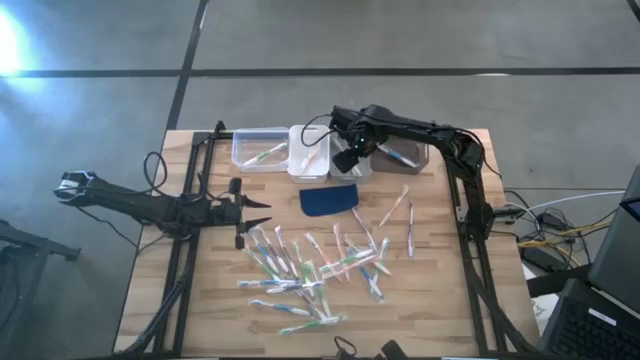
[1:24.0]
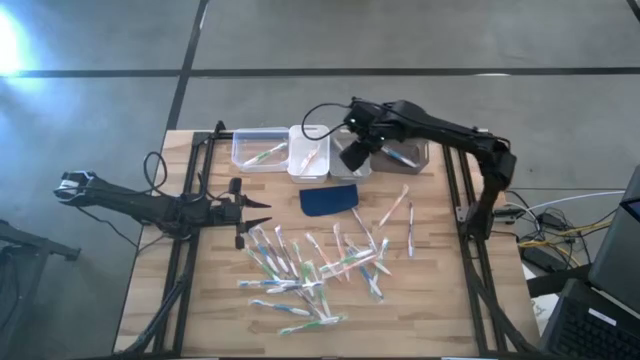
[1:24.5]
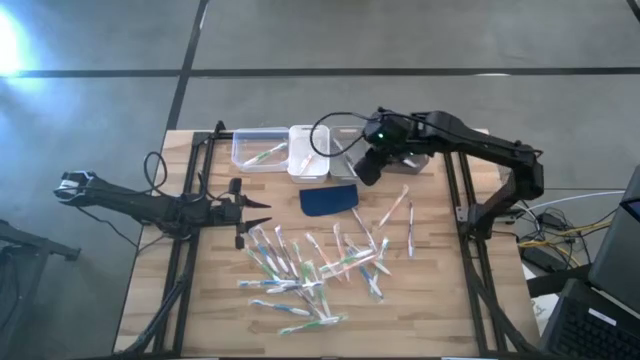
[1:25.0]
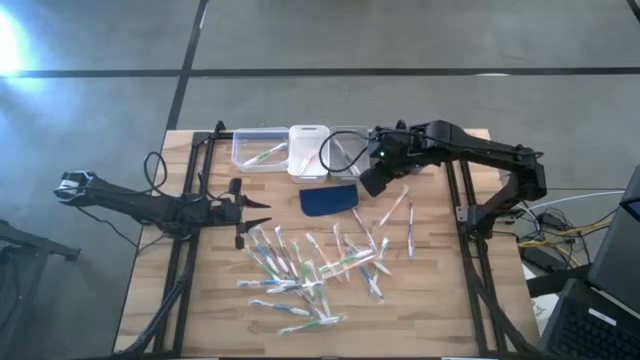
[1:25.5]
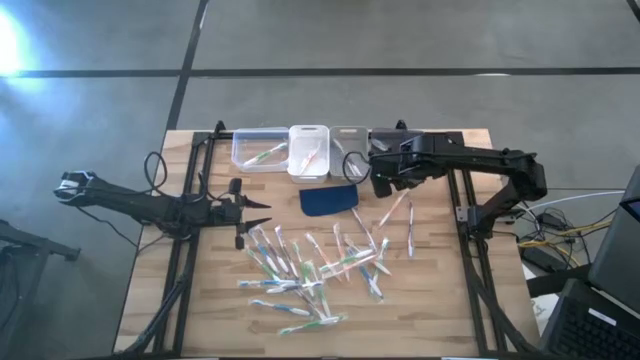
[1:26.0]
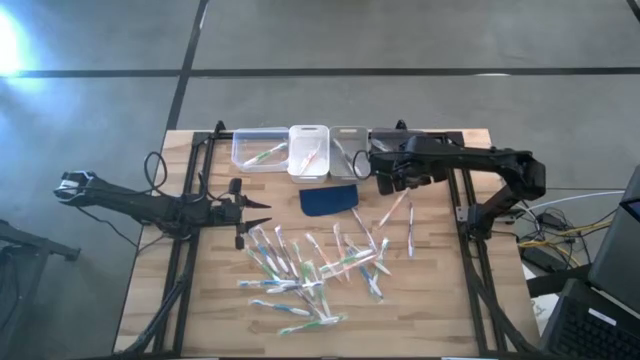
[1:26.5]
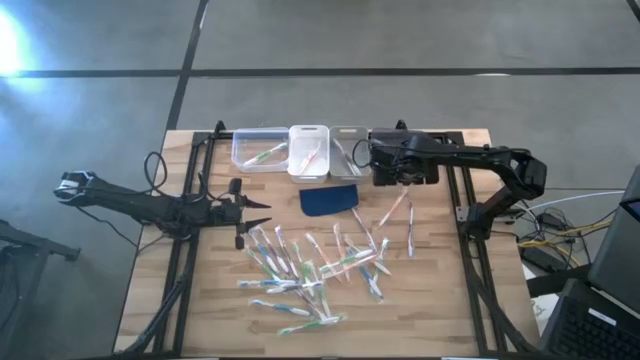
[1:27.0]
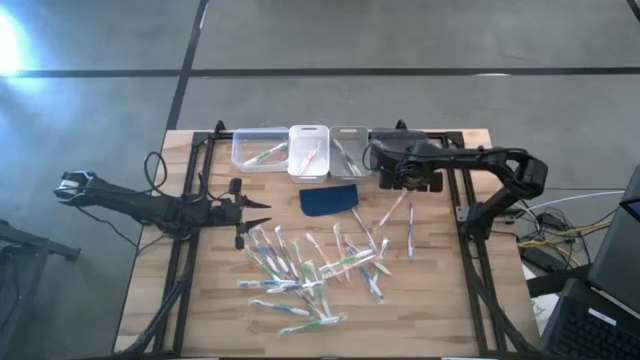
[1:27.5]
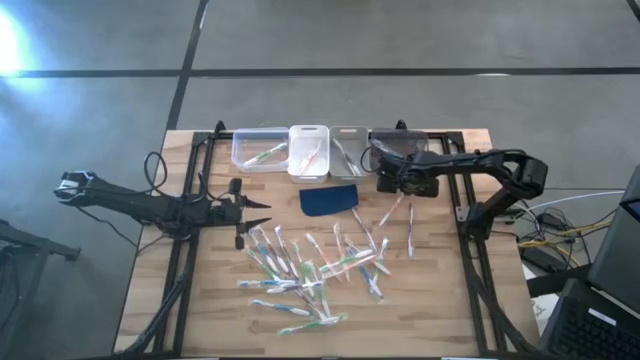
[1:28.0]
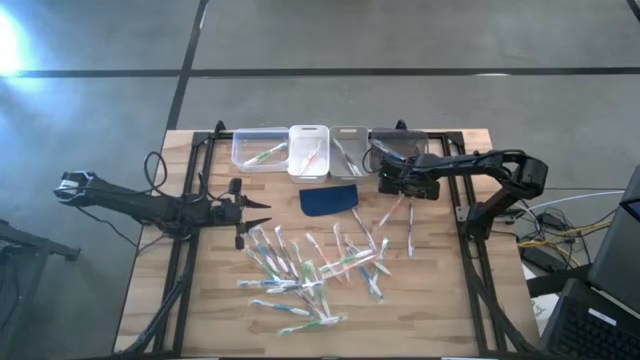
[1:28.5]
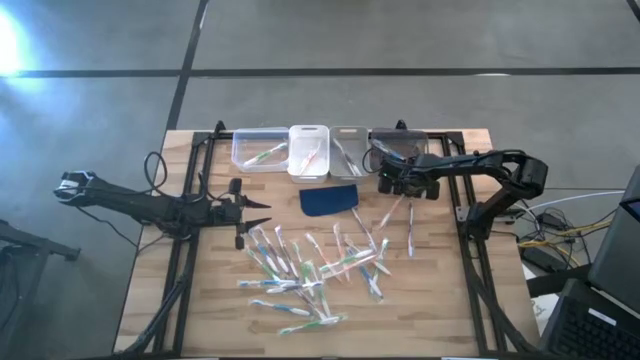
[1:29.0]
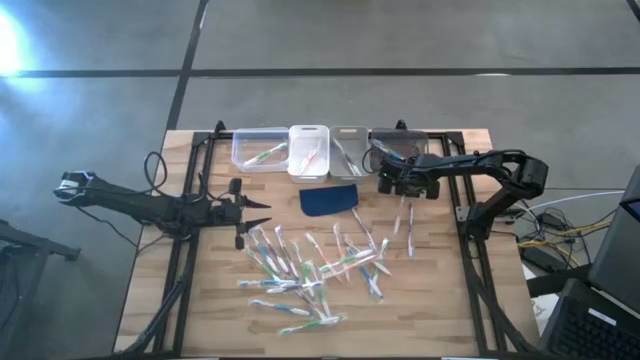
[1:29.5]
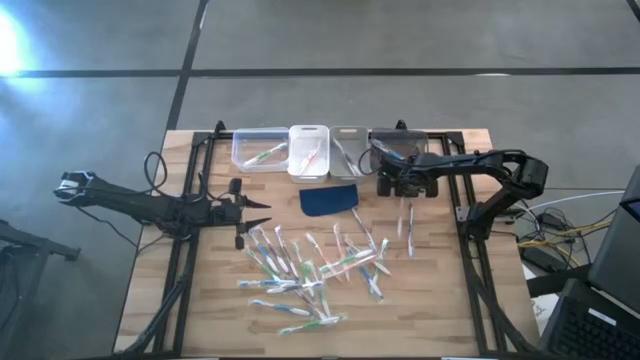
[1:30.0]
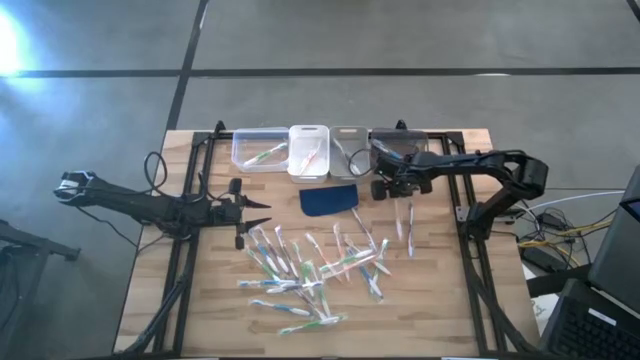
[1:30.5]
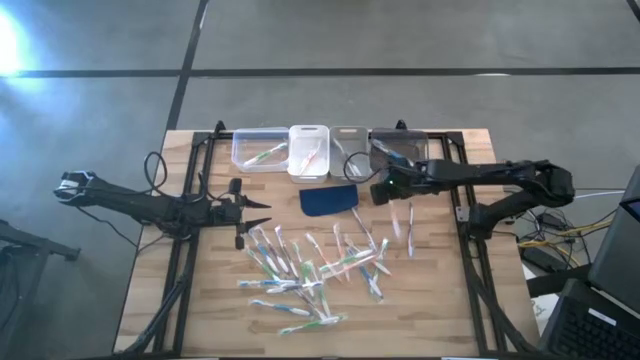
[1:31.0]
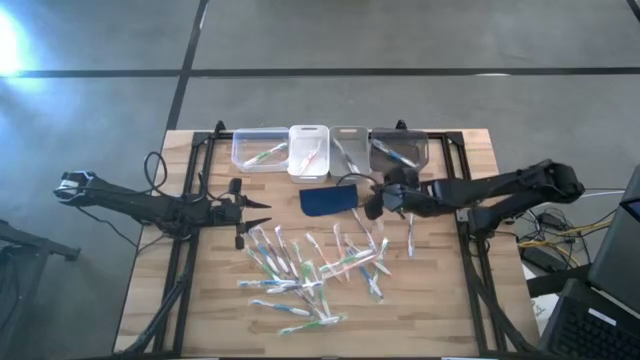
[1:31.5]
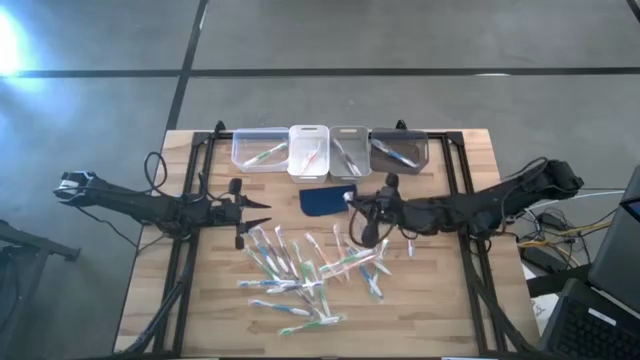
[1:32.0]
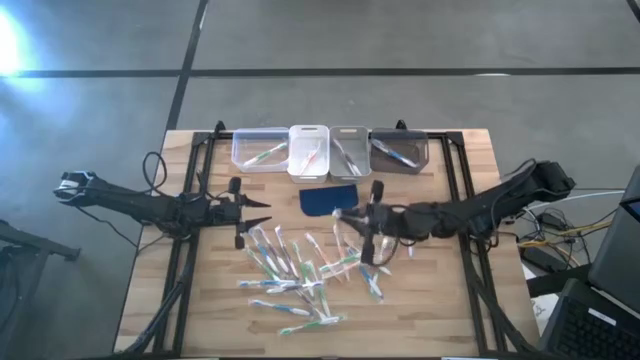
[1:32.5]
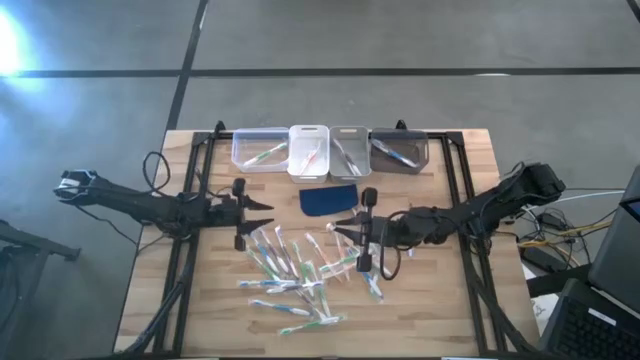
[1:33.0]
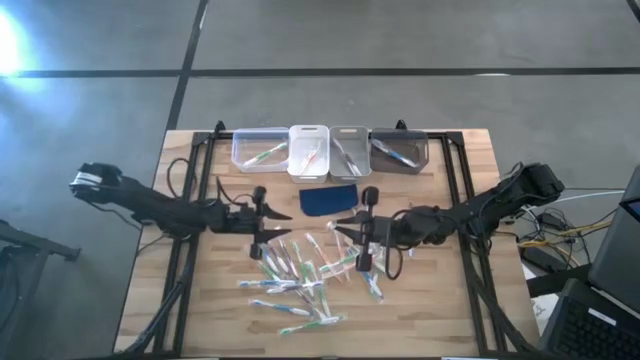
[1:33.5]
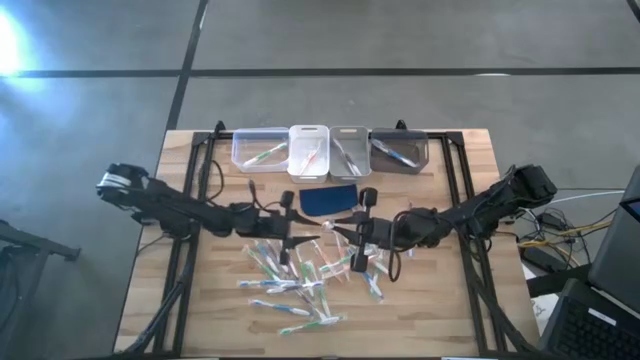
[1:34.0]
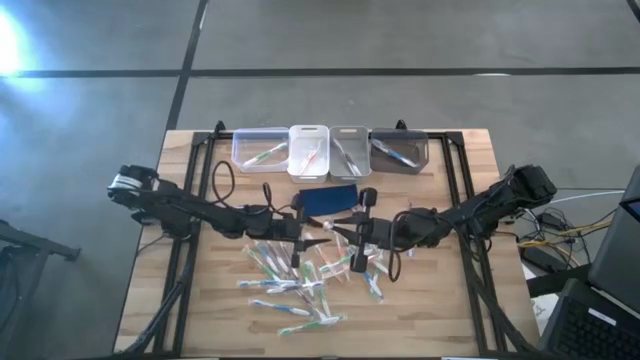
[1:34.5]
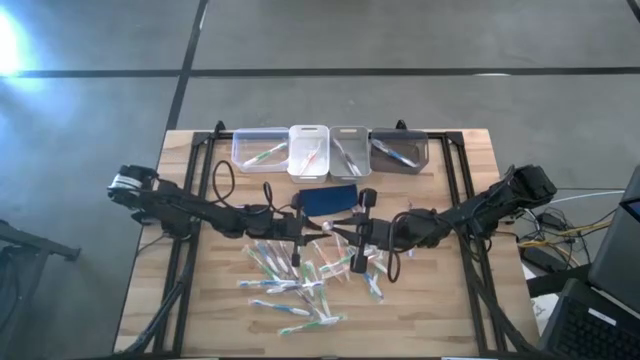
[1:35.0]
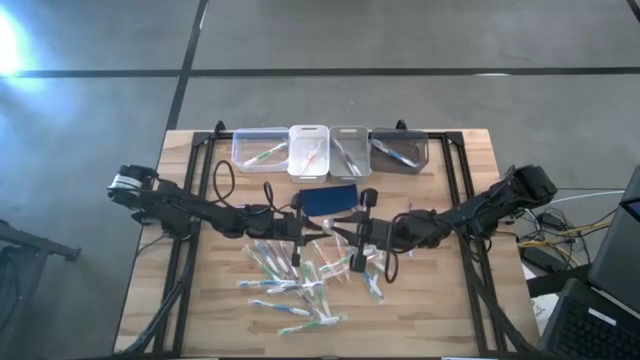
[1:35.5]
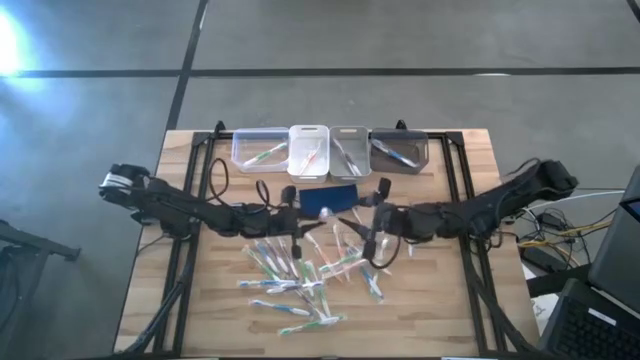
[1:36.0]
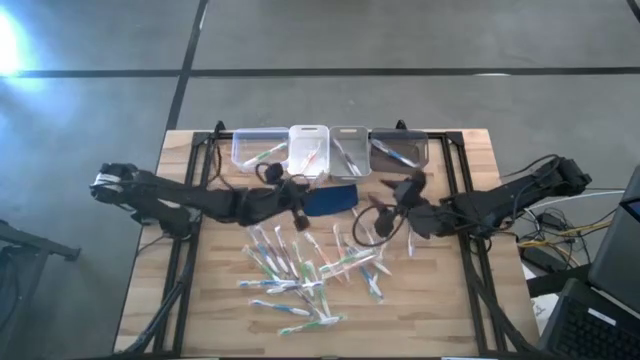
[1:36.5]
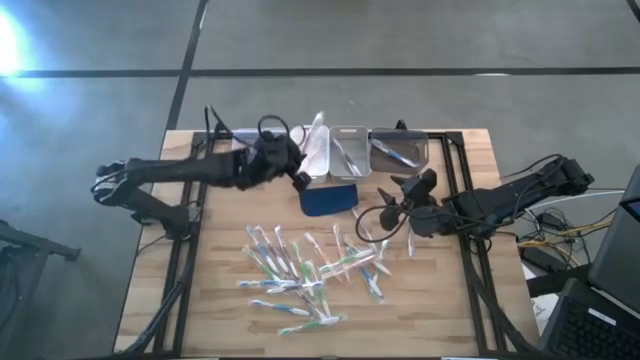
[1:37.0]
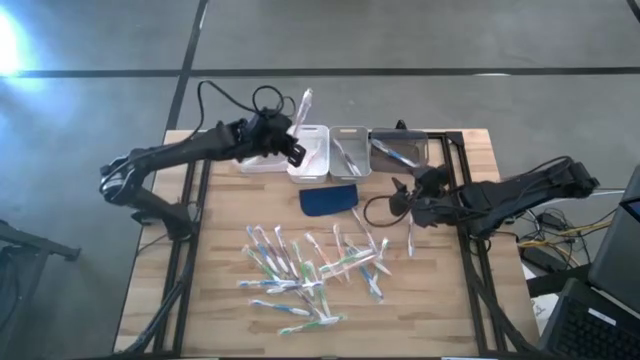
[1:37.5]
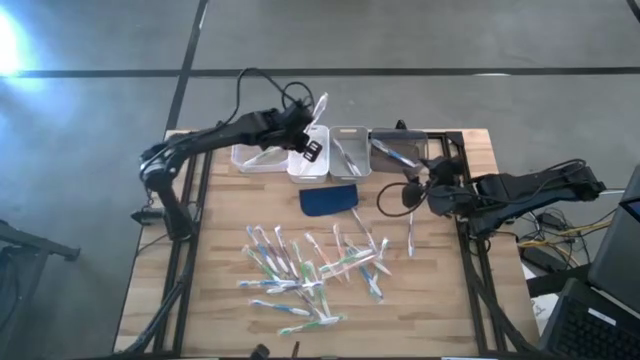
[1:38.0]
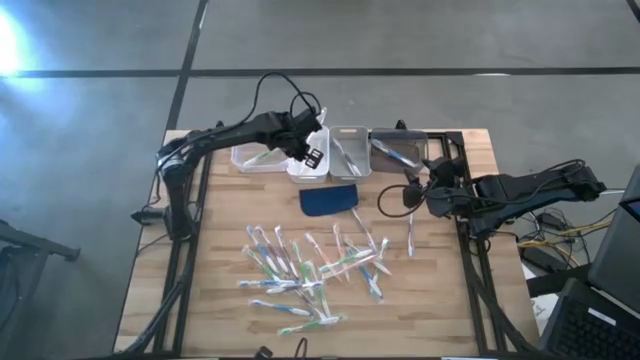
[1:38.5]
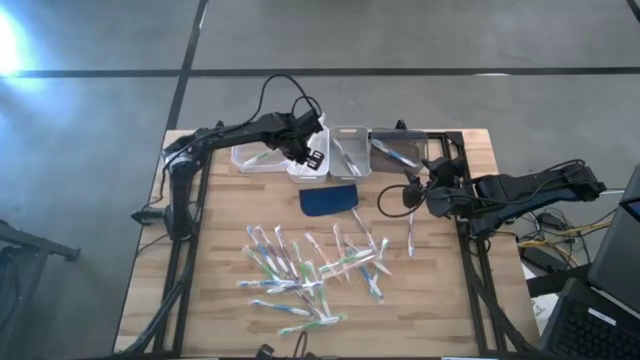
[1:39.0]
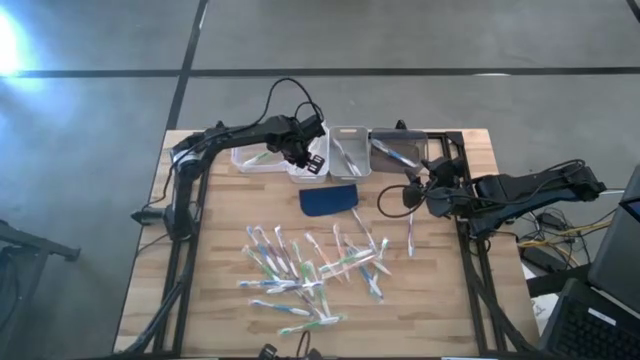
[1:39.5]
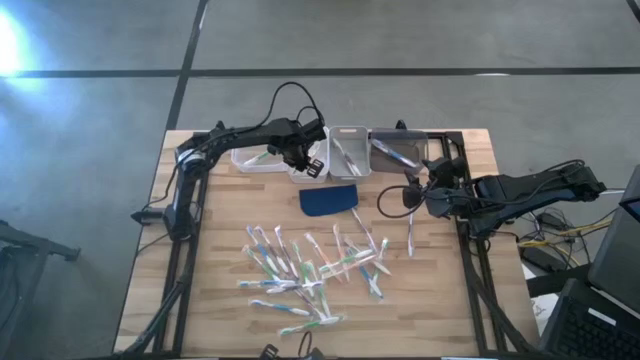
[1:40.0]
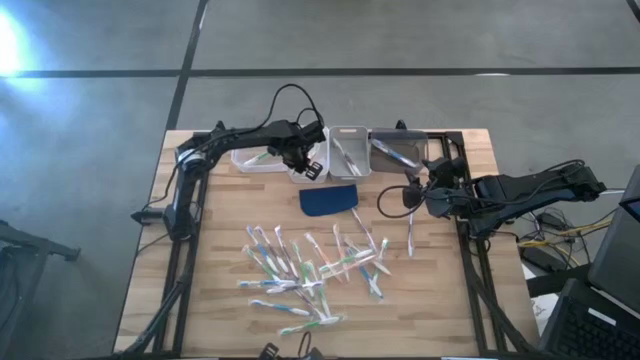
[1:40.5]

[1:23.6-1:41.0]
Task: Pick & Place Toothbrushes
Put the orange toothbrush into the white bin

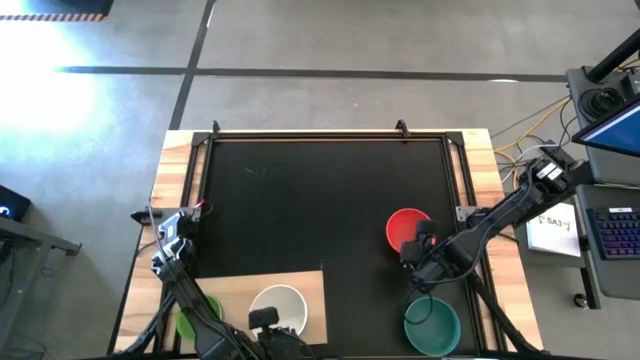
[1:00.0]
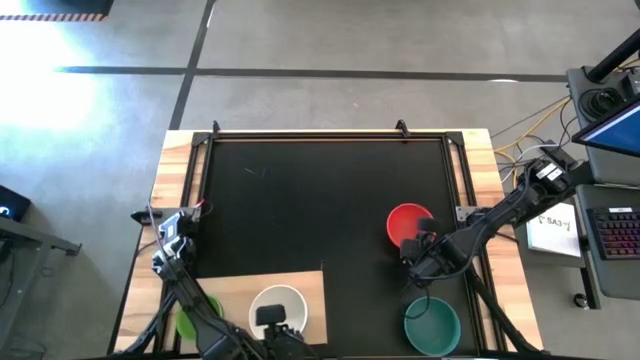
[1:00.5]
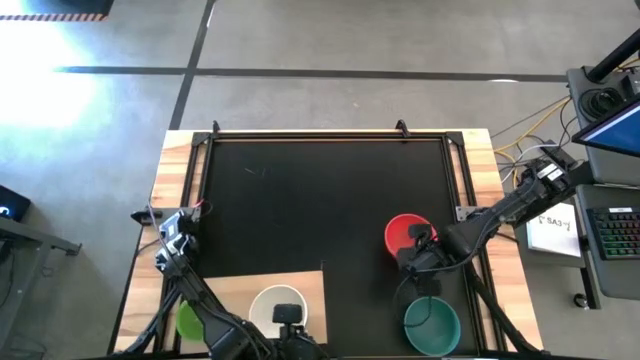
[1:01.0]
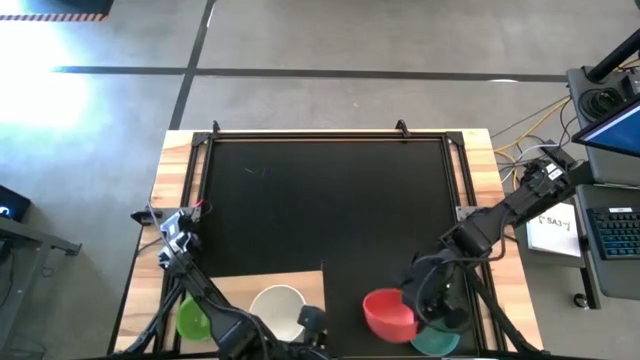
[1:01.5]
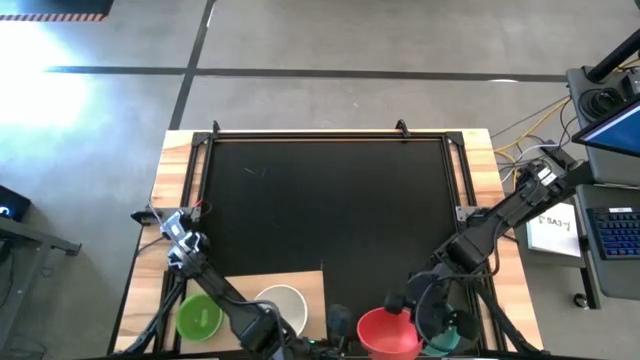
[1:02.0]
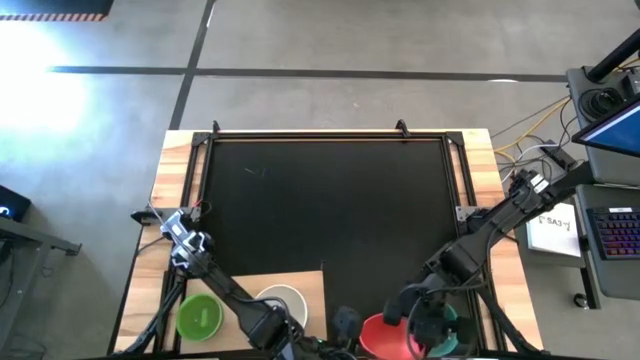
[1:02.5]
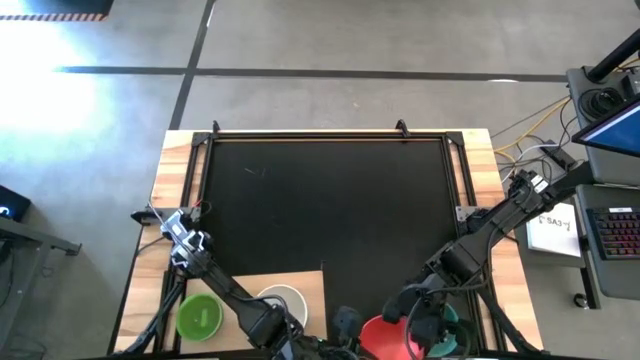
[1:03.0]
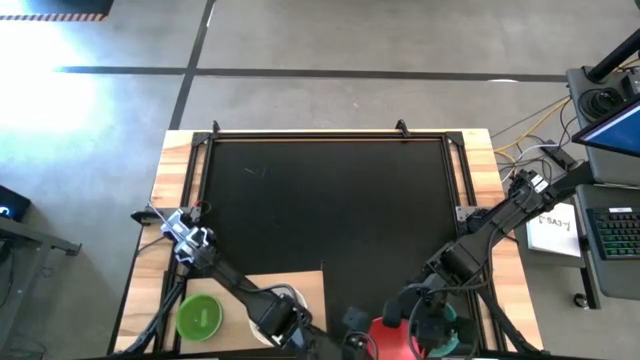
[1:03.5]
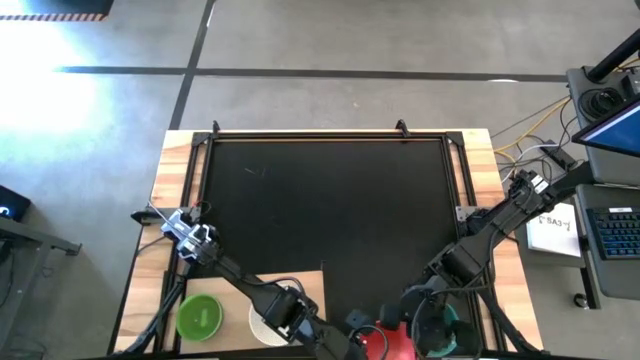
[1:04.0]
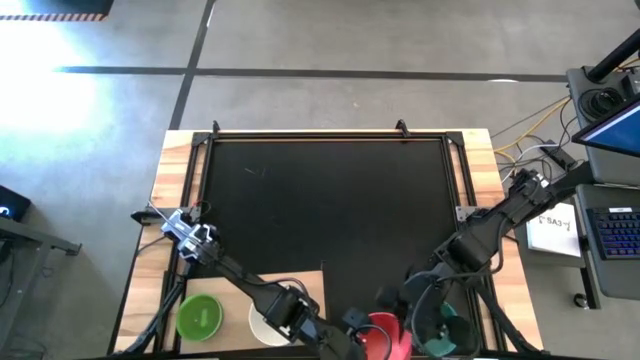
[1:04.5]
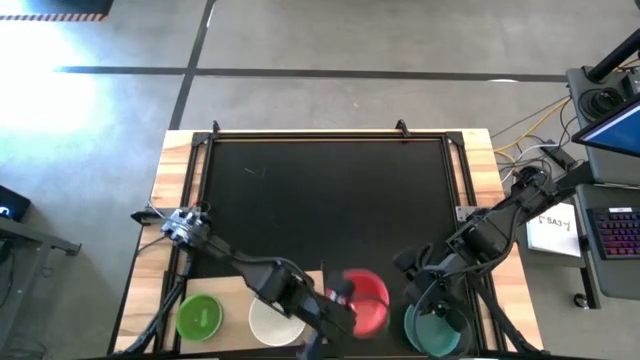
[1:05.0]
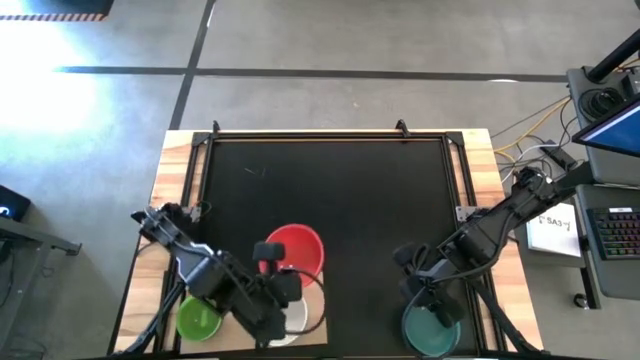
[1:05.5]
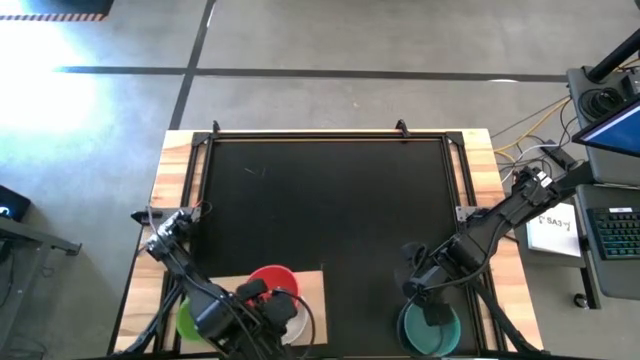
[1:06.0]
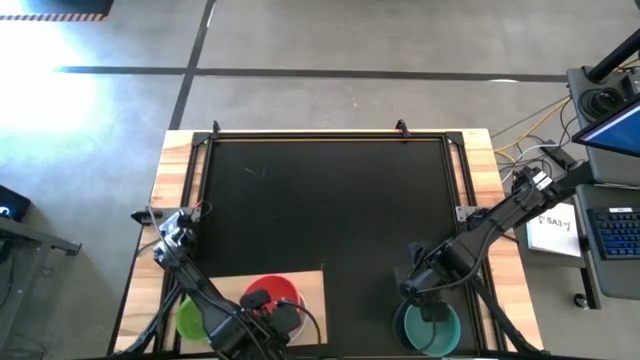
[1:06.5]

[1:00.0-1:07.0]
Task: Place and stack bowls onto a shelf
Stack the orange bowl on top of the white bowl on the shelf
